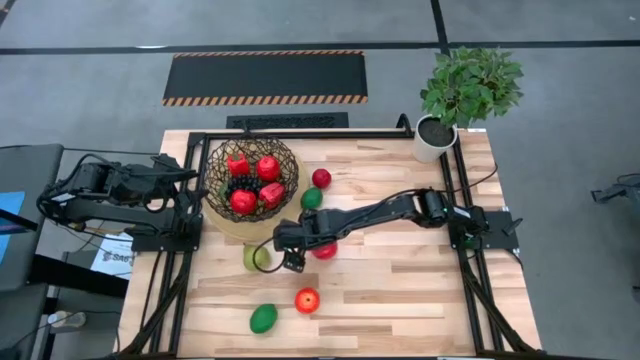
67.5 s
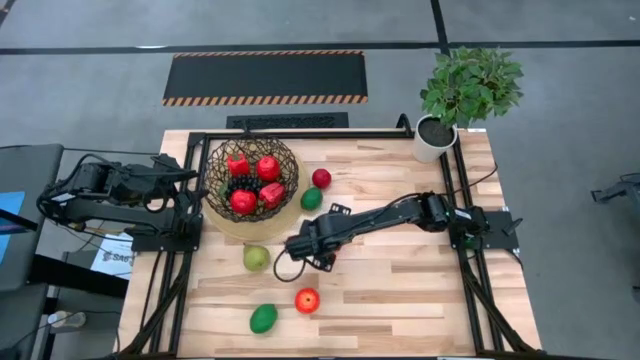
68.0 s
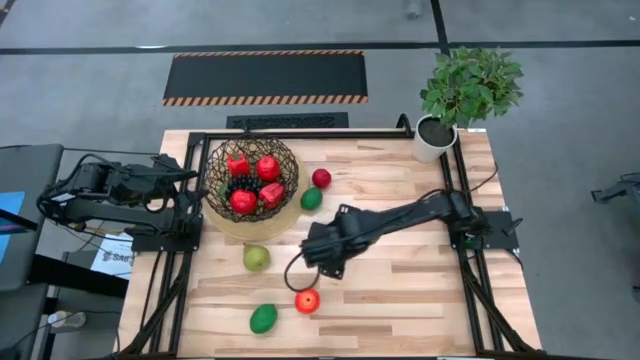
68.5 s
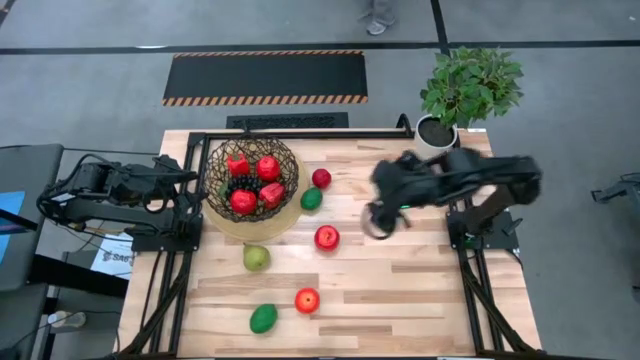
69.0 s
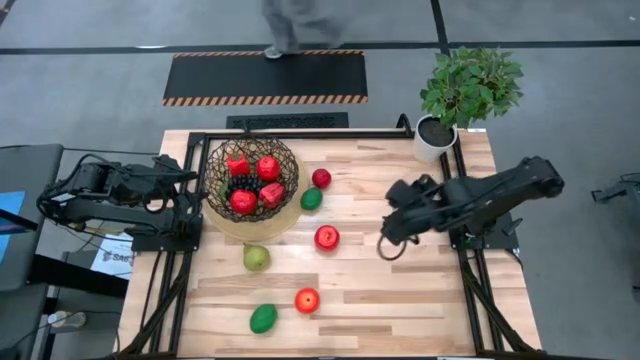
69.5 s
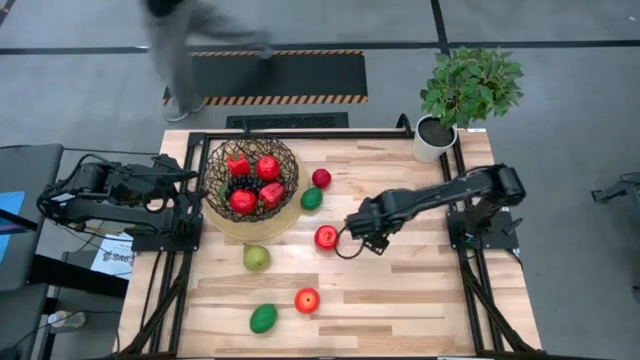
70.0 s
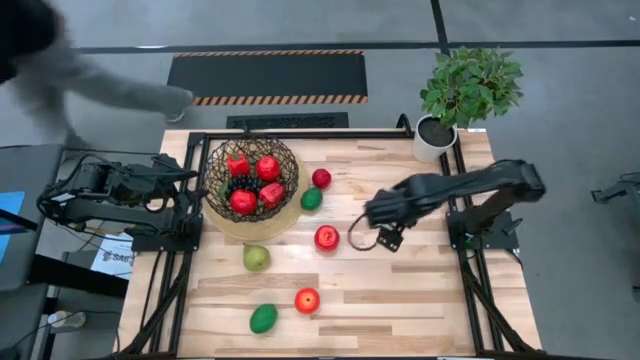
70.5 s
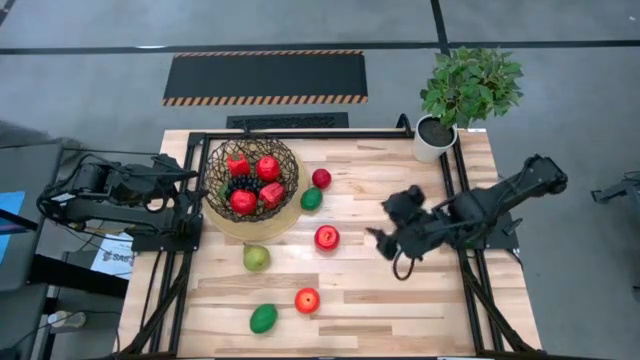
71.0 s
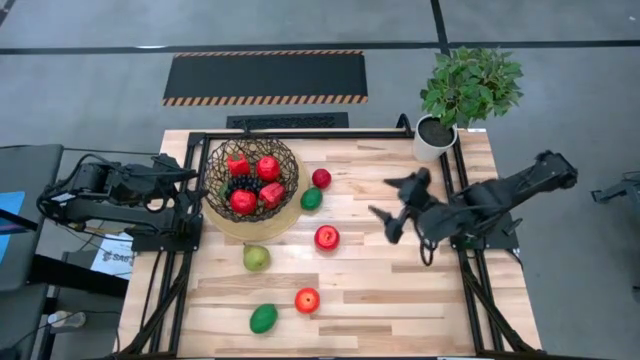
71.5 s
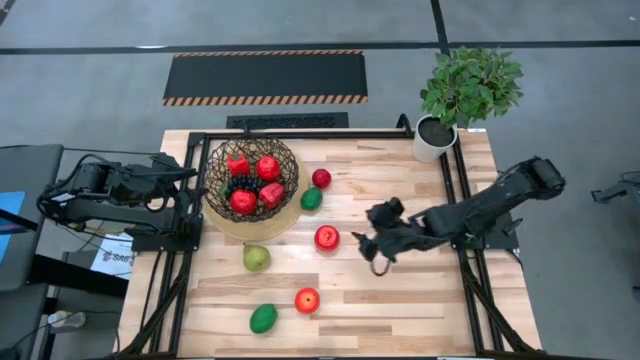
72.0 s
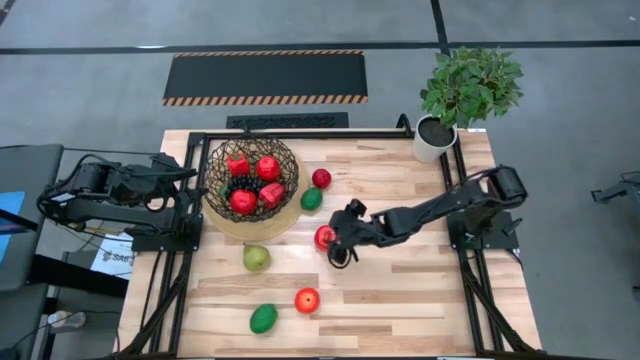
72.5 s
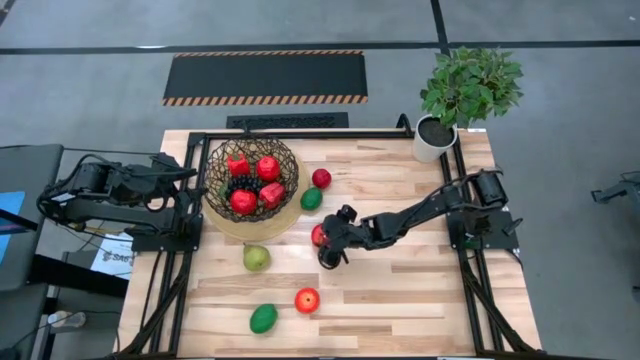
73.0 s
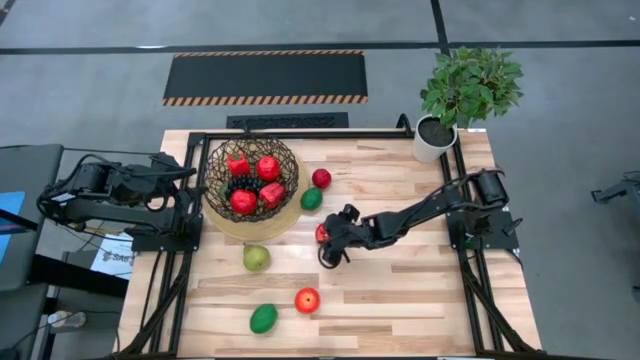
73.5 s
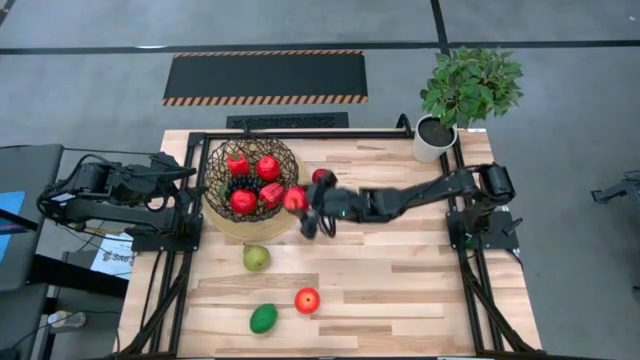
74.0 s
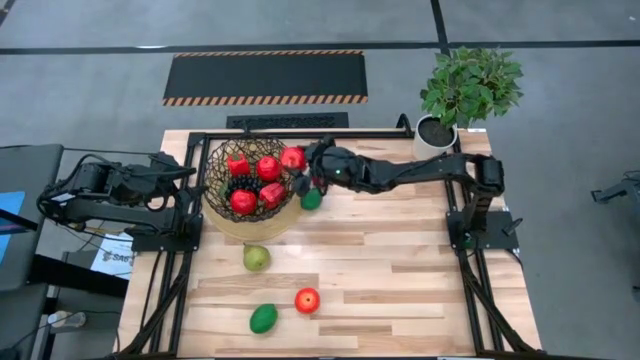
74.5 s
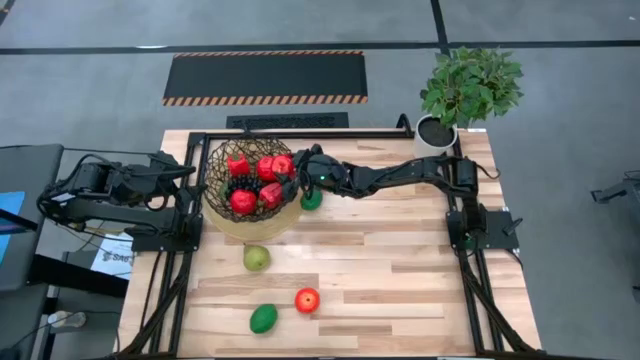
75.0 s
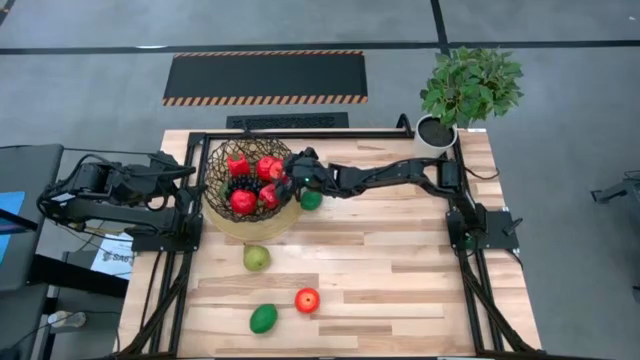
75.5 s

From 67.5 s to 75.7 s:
Task: Build produce basket
Put the red apple into the black wire basket

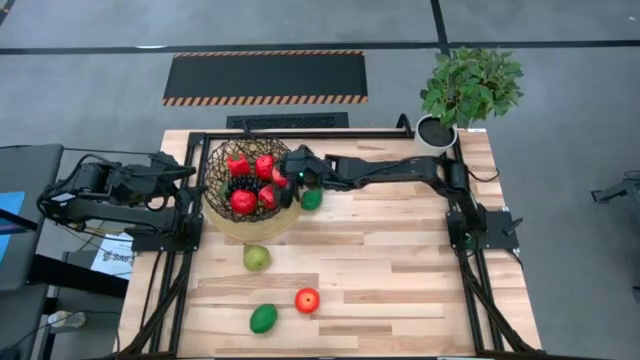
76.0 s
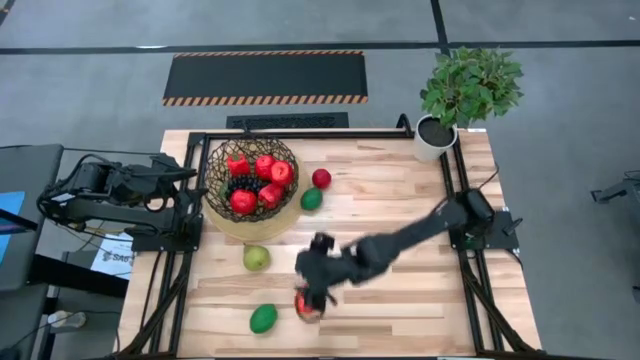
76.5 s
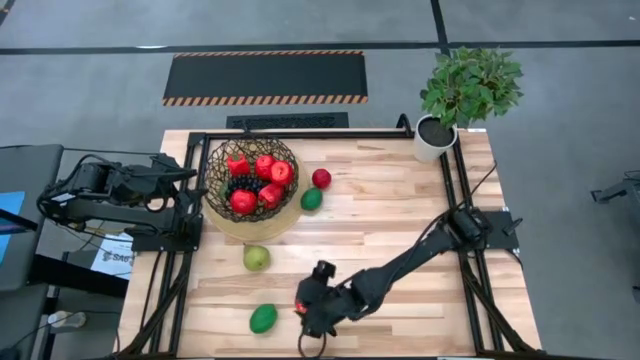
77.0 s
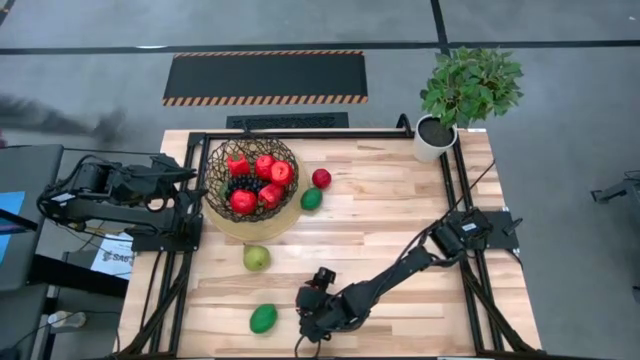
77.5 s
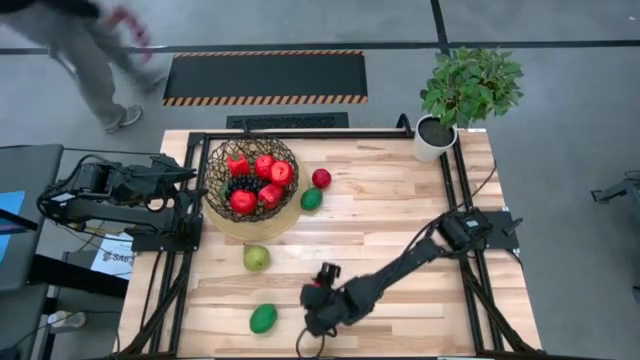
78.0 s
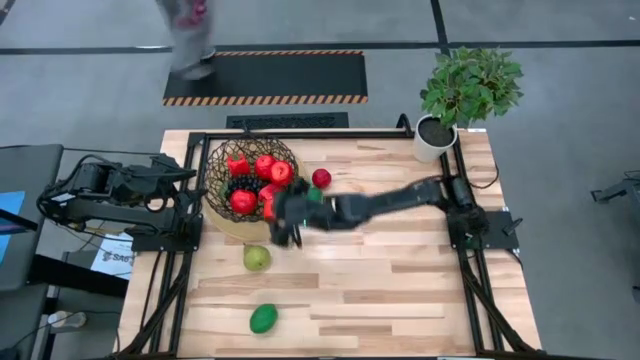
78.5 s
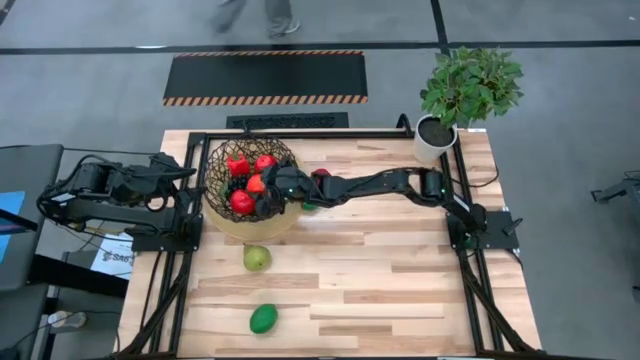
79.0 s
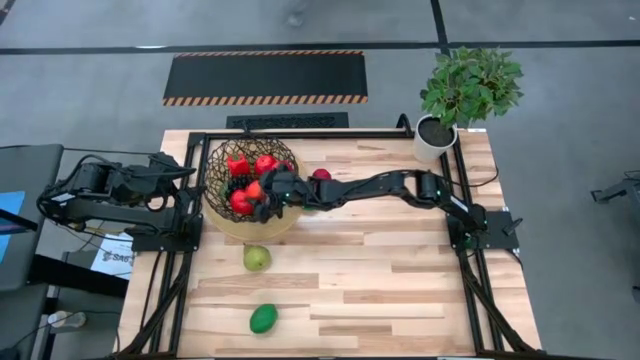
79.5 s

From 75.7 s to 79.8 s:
Put the red apple into the black wire basket

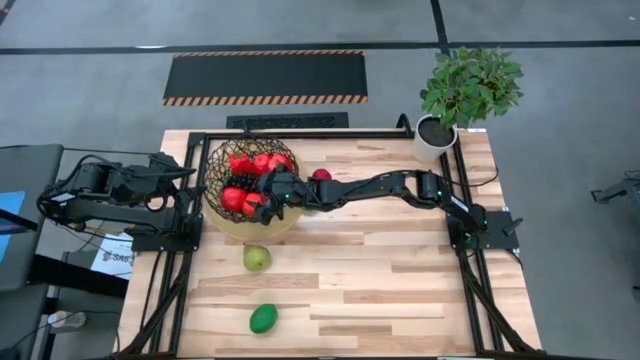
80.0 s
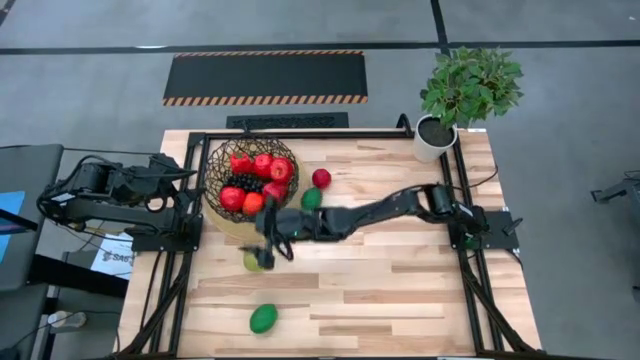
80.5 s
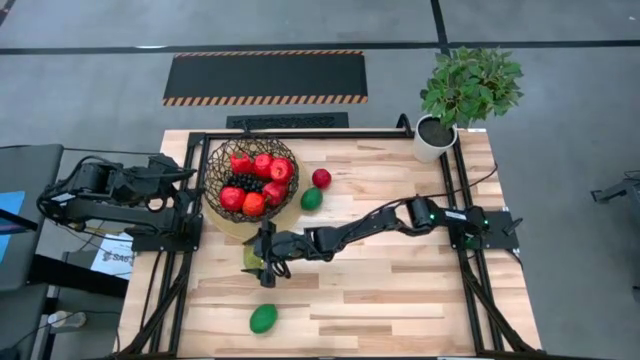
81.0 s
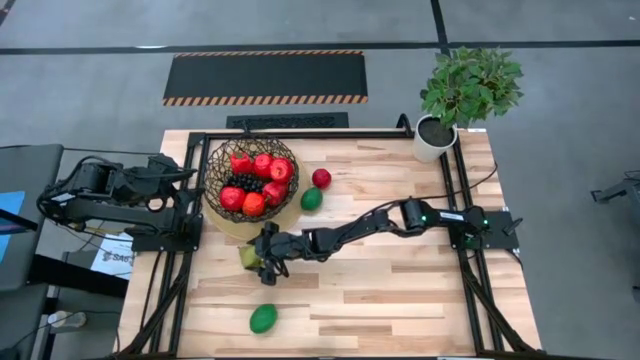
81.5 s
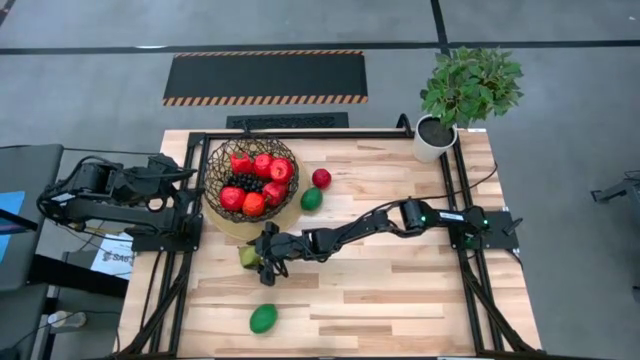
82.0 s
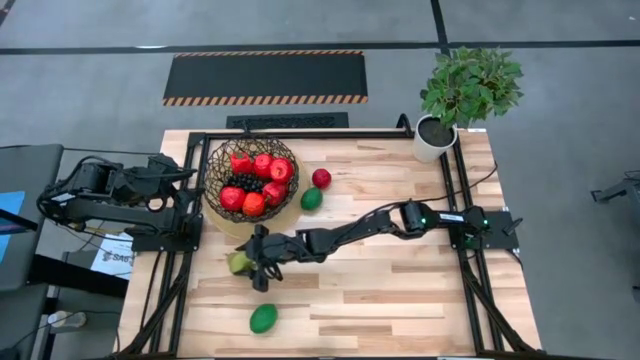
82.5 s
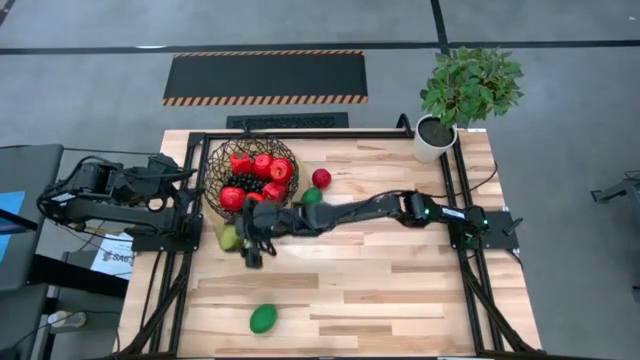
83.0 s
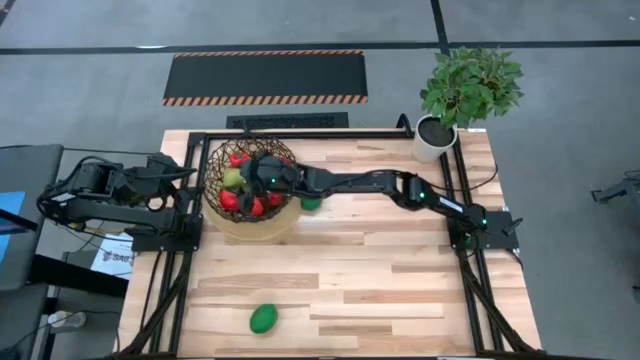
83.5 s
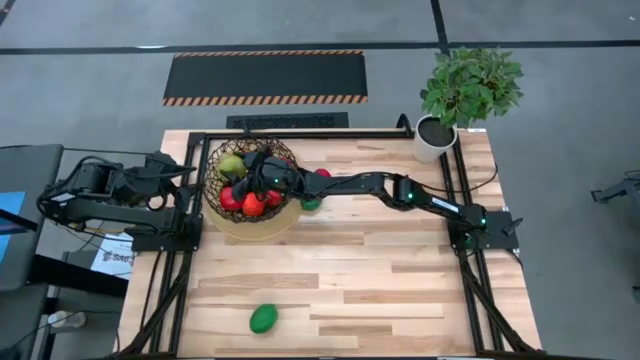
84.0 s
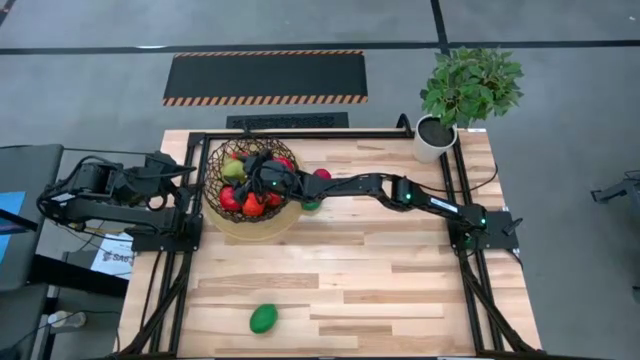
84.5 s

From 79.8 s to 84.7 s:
Put the green pear into the black wire basket

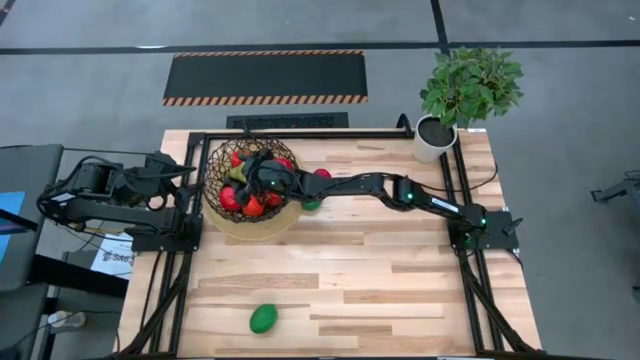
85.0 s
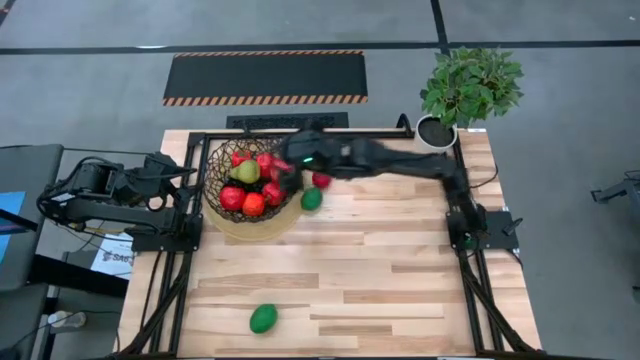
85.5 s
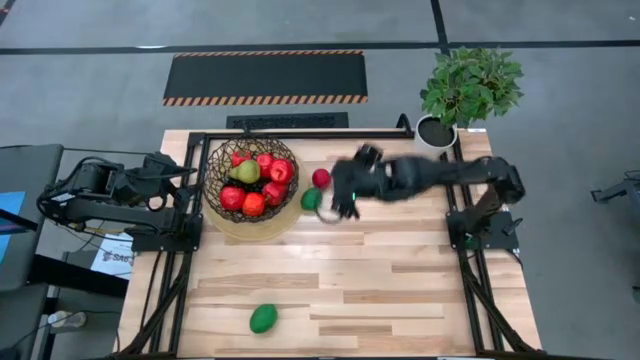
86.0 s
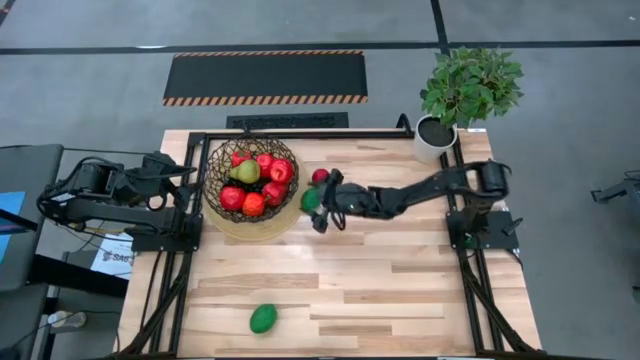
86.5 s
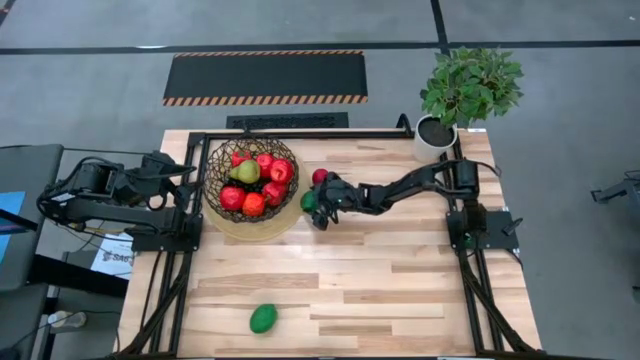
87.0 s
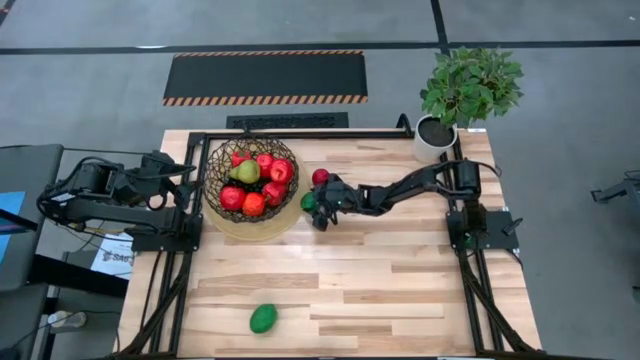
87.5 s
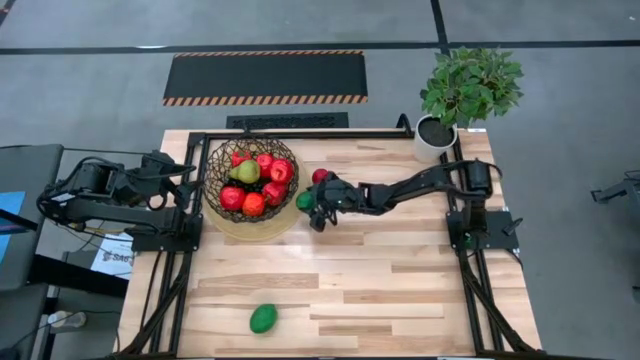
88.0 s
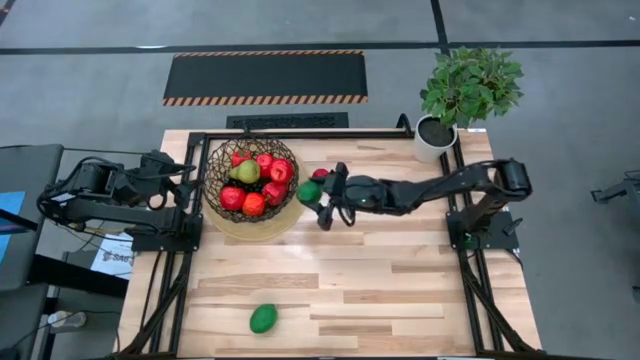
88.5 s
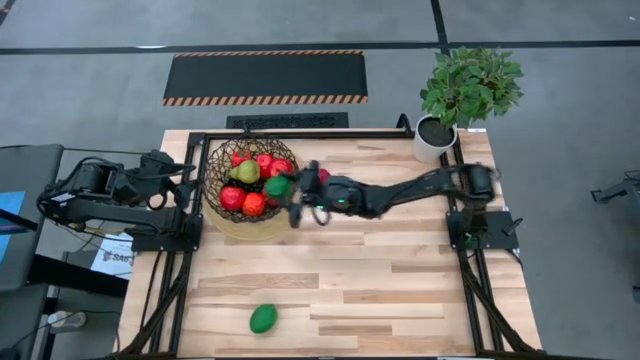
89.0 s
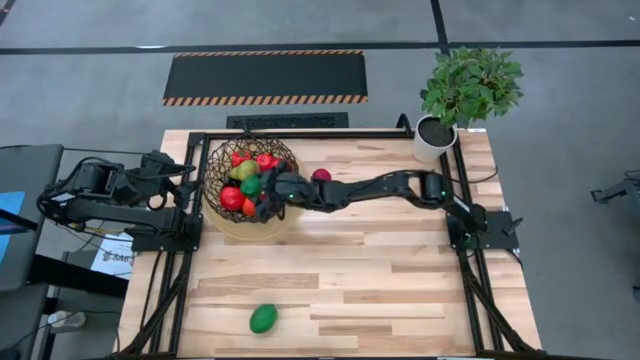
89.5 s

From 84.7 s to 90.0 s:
Put the green lime into the black wire basket
